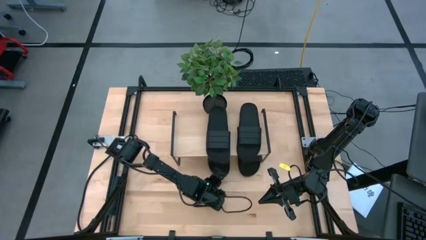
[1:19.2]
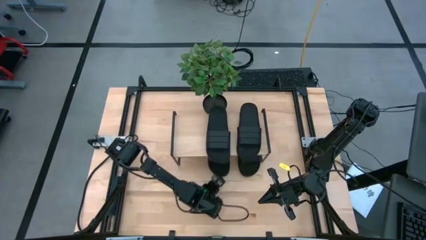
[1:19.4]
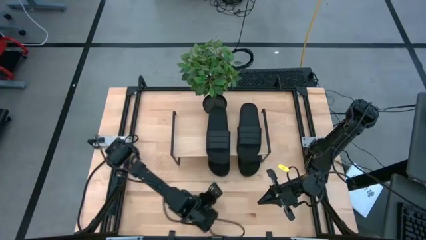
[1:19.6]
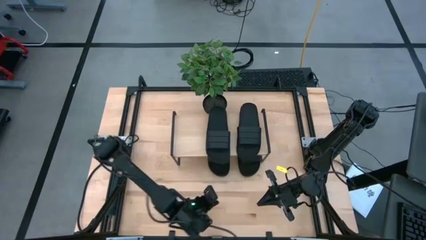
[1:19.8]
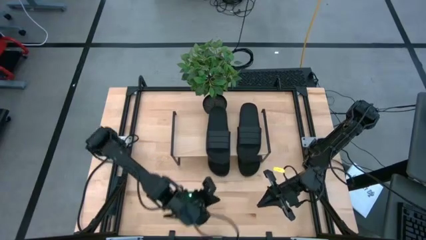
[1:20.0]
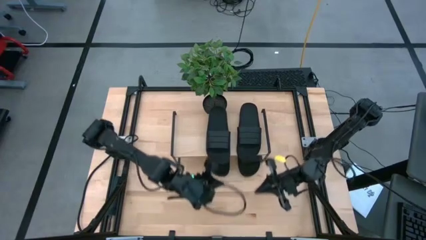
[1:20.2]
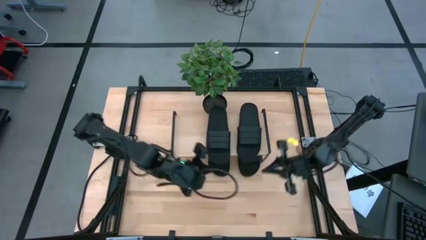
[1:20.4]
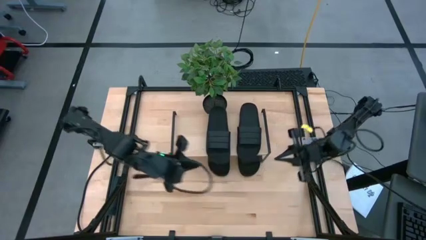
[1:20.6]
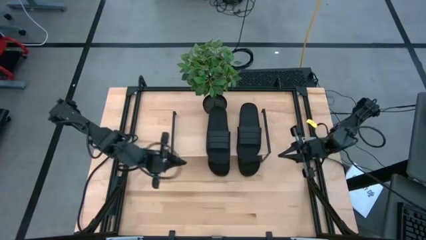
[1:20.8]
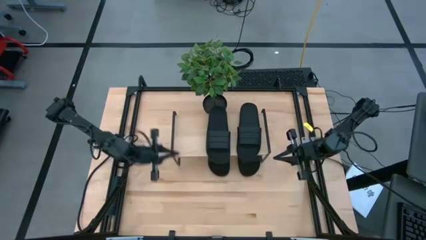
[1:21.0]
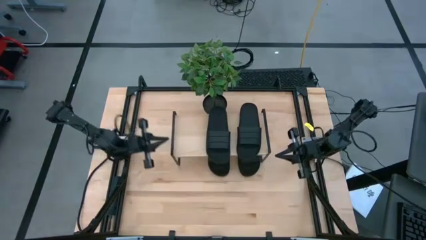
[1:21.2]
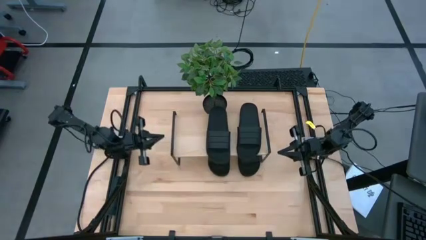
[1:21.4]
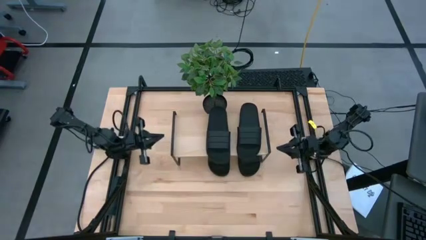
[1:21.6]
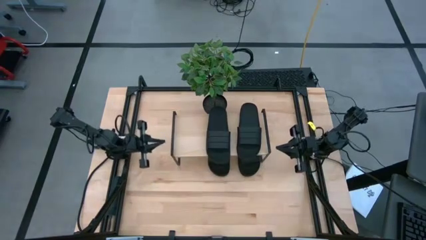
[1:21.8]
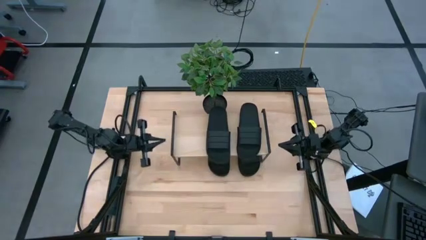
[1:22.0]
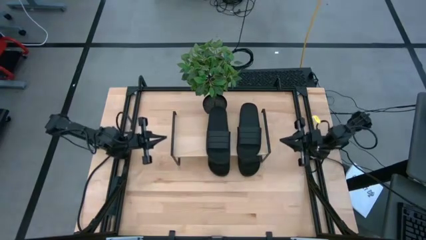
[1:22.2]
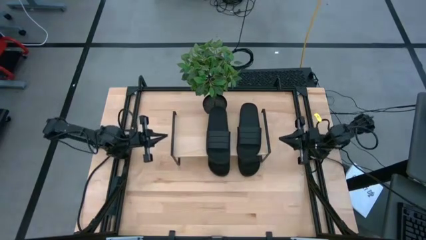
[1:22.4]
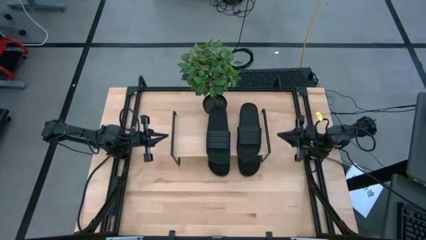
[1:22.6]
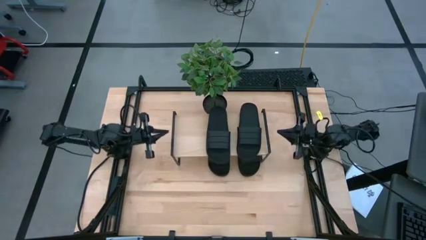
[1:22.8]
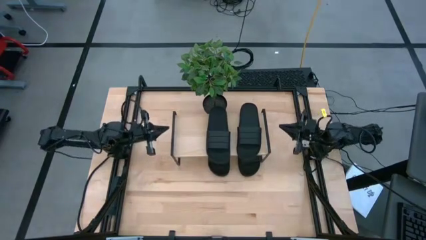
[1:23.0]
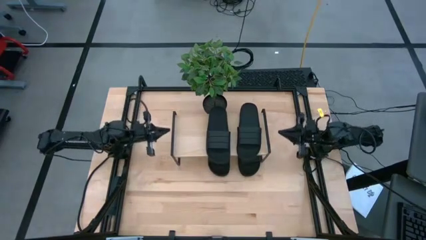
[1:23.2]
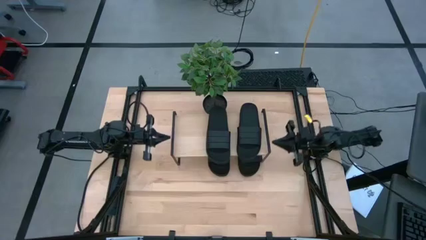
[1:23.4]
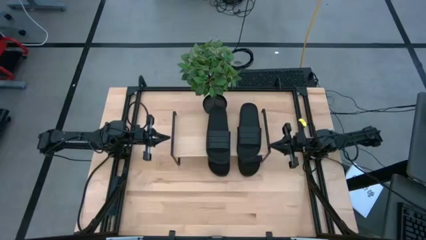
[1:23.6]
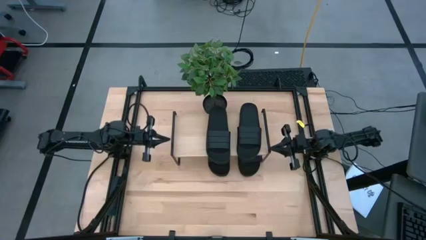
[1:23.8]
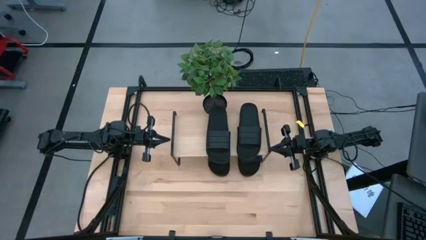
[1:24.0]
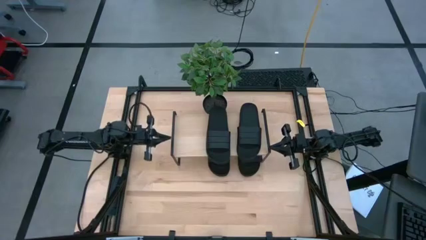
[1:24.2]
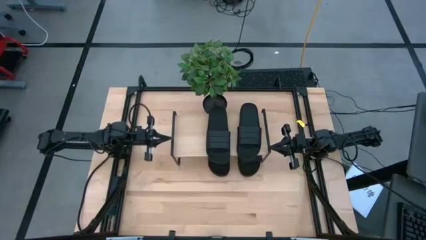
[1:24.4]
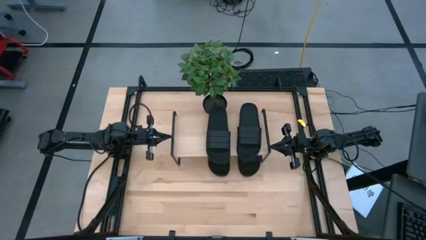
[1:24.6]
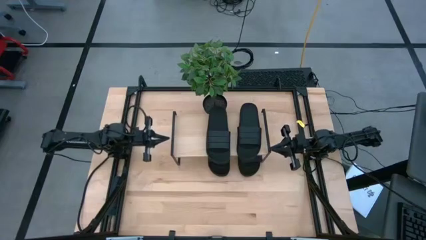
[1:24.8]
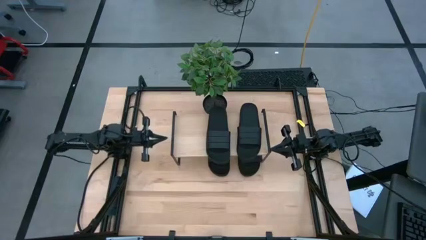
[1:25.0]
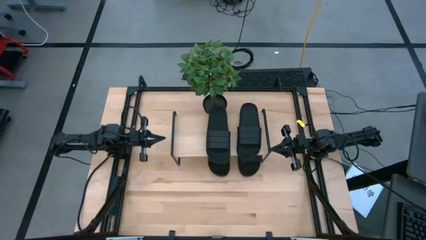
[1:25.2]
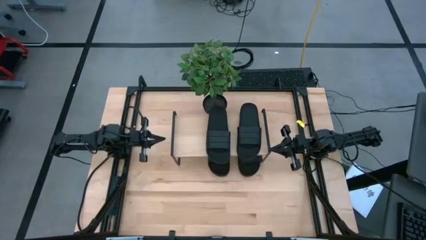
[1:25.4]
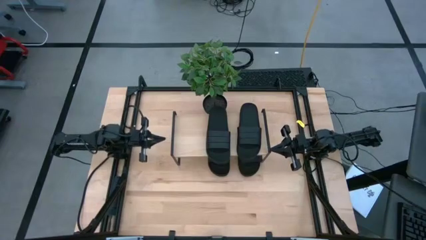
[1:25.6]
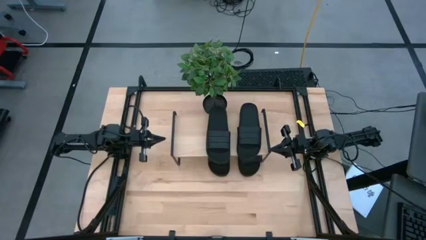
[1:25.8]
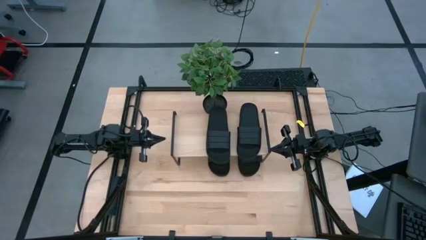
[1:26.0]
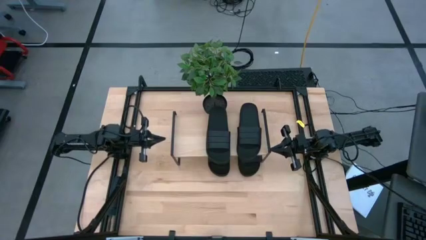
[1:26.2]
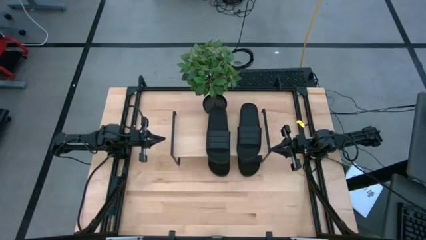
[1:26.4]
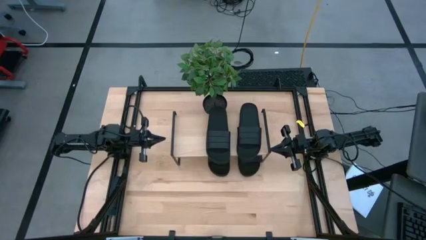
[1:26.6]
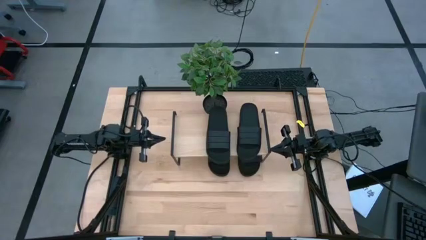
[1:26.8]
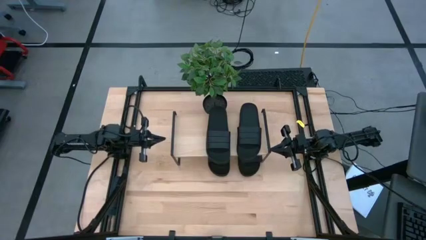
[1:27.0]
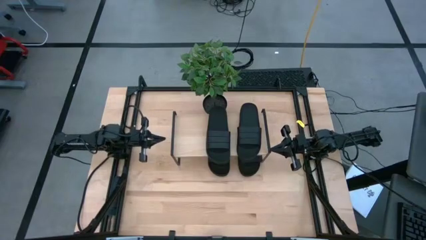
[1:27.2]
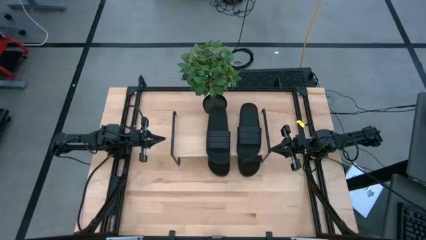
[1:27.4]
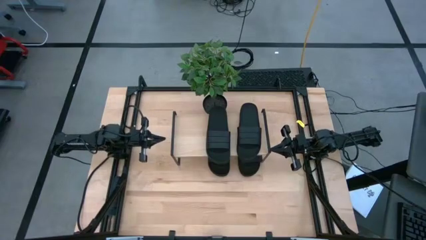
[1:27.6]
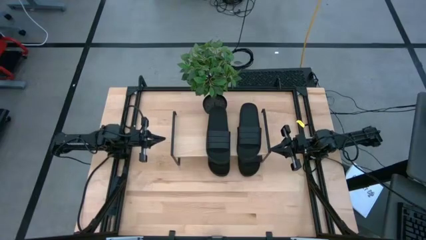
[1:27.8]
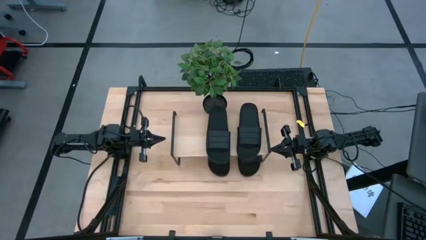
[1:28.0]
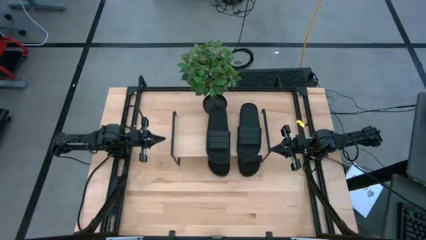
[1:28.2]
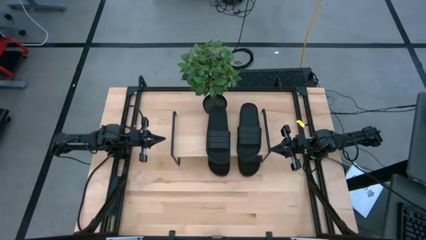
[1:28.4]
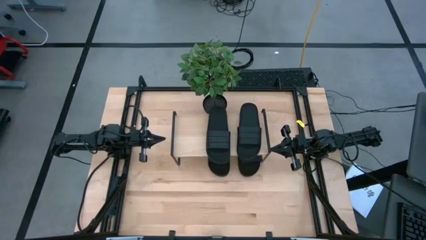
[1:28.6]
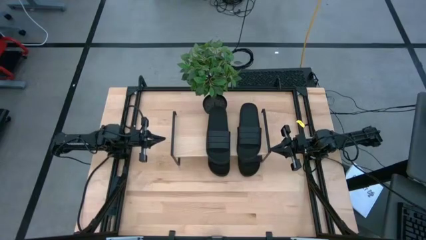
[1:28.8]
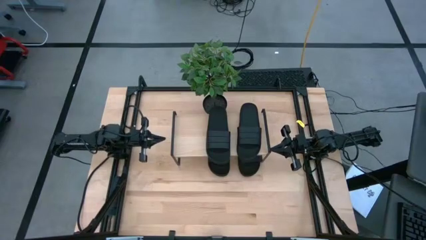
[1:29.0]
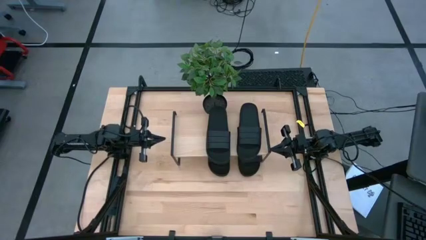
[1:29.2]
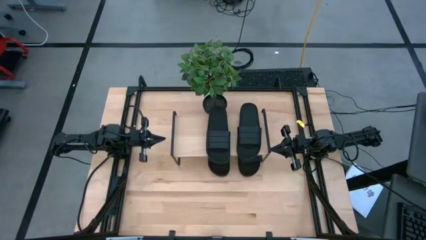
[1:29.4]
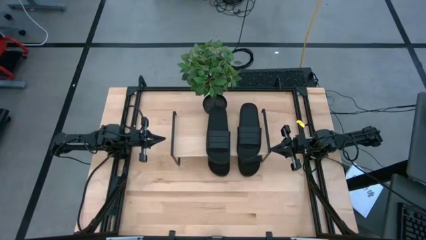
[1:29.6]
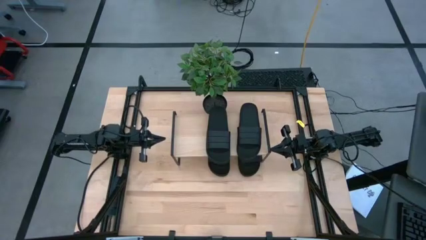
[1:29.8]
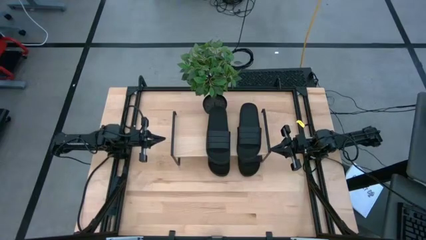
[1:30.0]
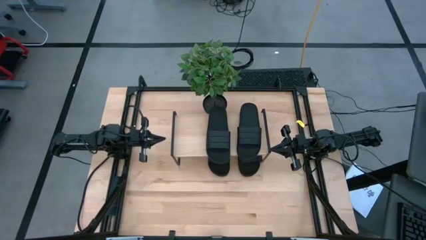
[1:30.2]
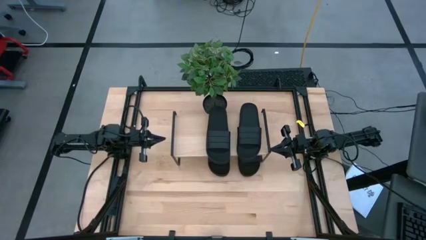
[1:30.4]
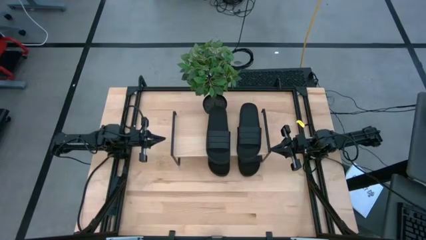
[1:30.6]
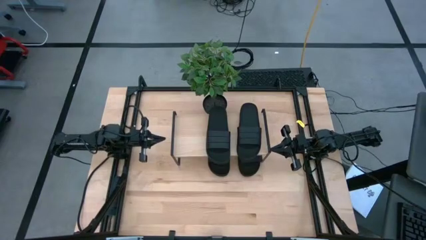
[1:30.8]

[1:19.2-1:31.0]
Task: Pick and place slides into the shelf
Return to Home Position
